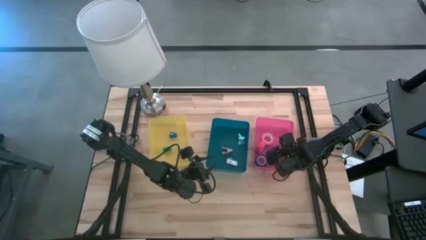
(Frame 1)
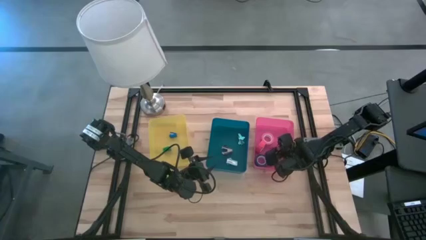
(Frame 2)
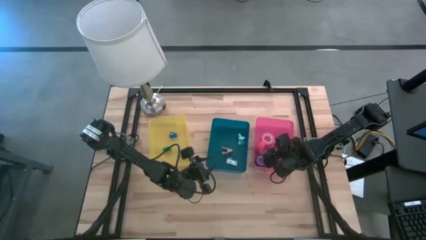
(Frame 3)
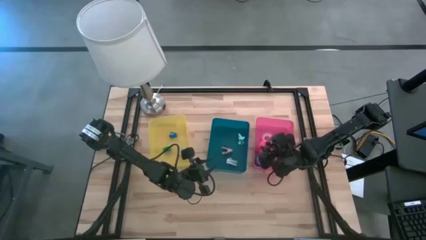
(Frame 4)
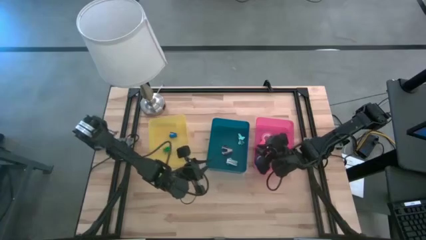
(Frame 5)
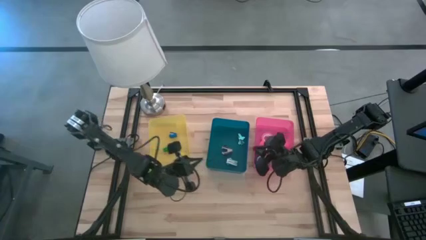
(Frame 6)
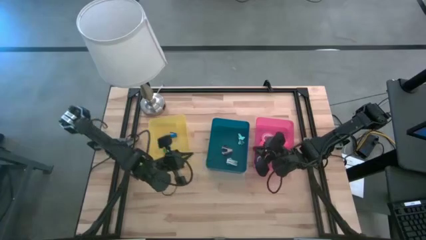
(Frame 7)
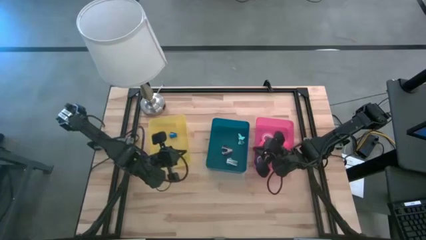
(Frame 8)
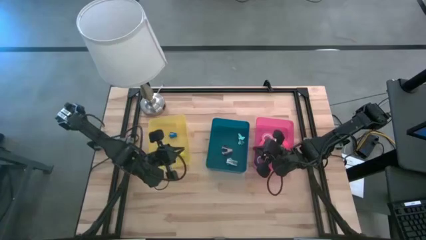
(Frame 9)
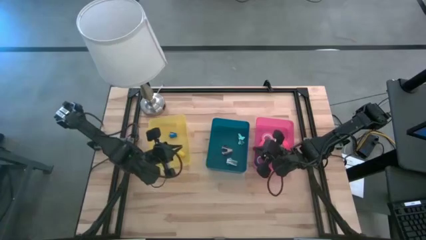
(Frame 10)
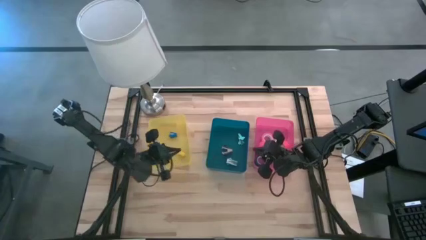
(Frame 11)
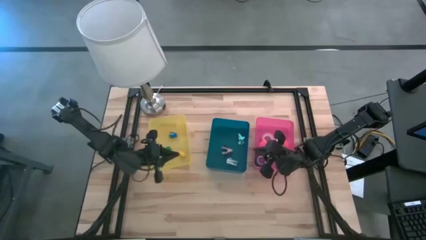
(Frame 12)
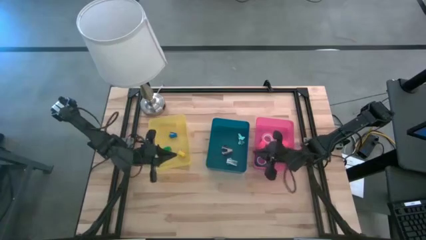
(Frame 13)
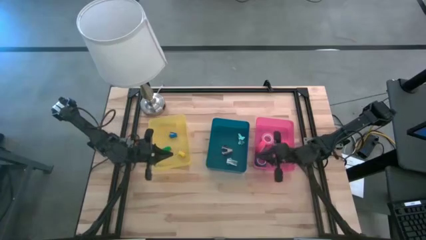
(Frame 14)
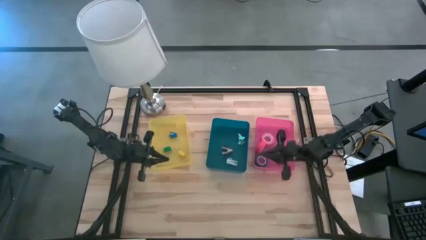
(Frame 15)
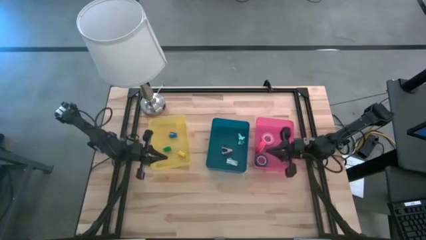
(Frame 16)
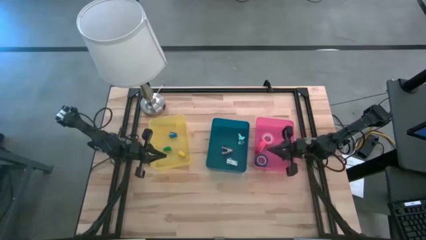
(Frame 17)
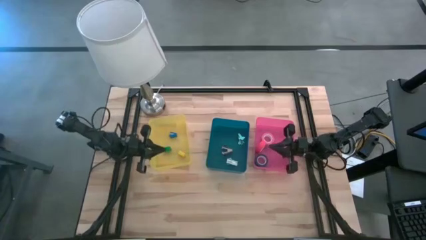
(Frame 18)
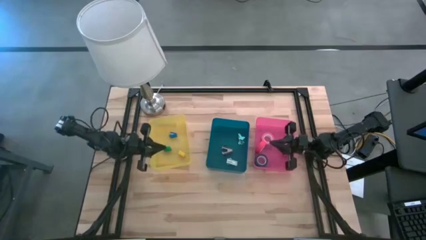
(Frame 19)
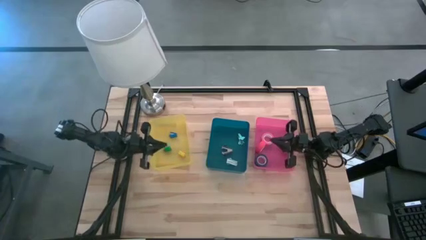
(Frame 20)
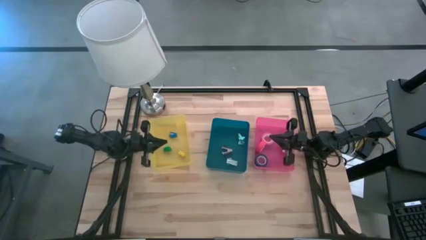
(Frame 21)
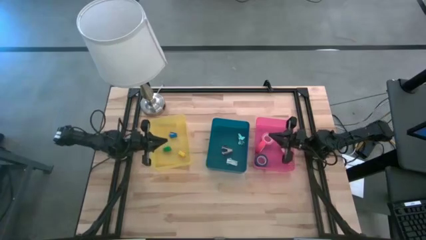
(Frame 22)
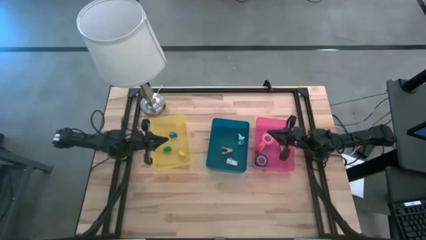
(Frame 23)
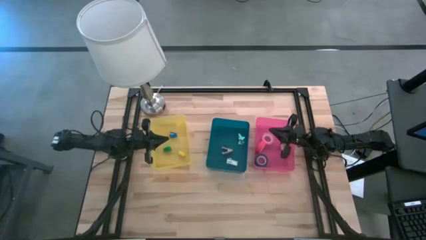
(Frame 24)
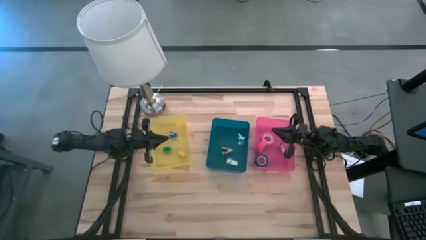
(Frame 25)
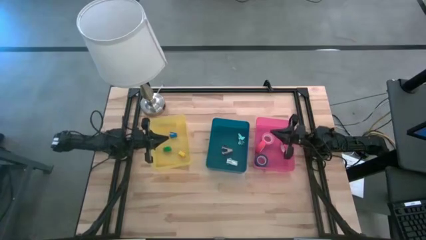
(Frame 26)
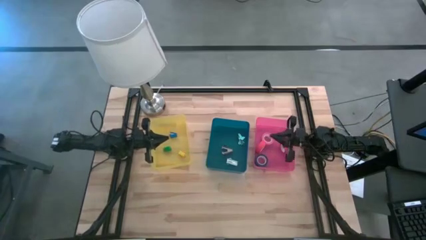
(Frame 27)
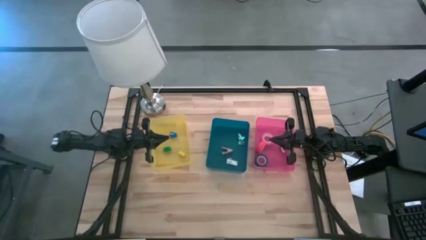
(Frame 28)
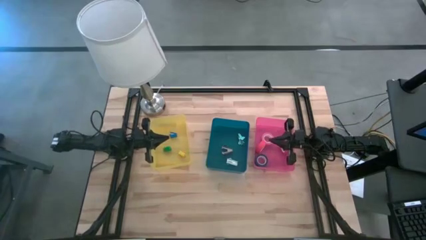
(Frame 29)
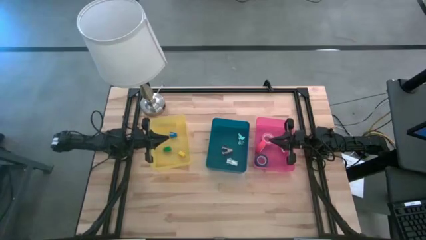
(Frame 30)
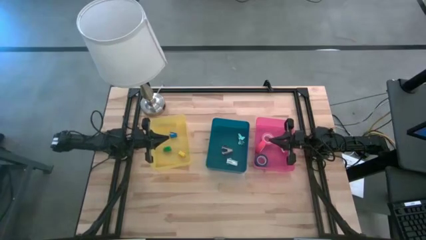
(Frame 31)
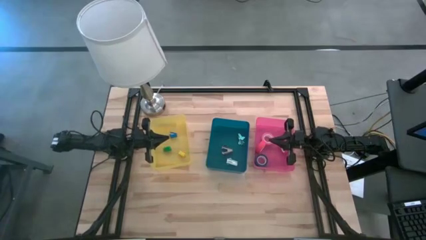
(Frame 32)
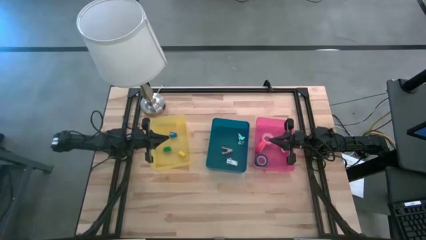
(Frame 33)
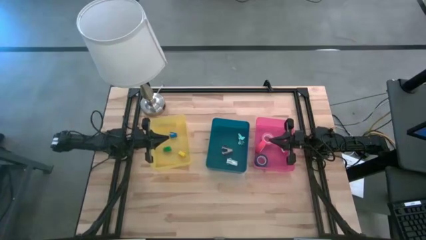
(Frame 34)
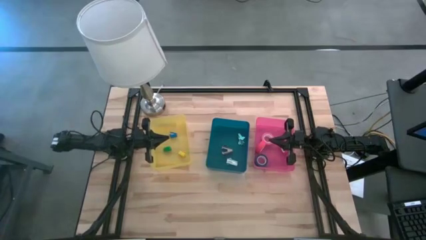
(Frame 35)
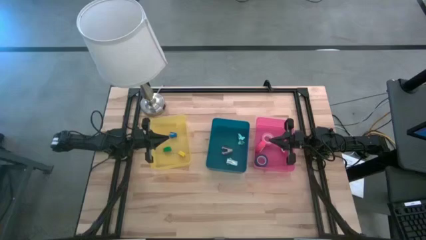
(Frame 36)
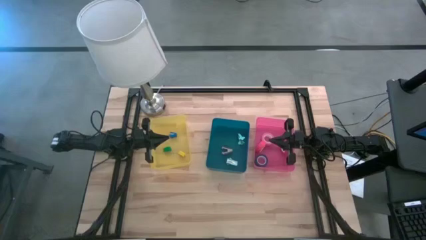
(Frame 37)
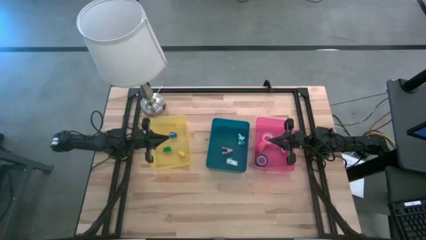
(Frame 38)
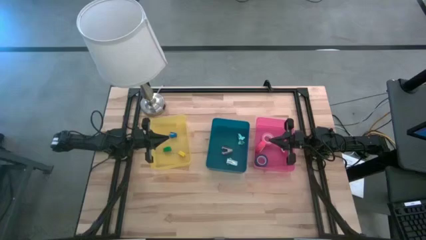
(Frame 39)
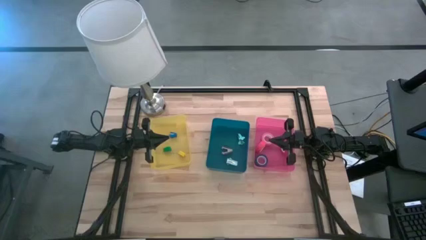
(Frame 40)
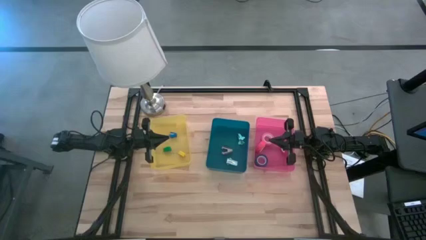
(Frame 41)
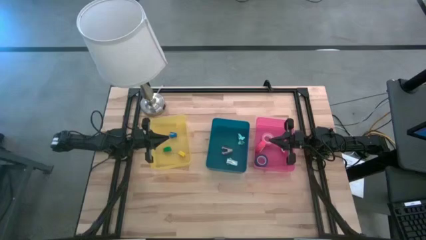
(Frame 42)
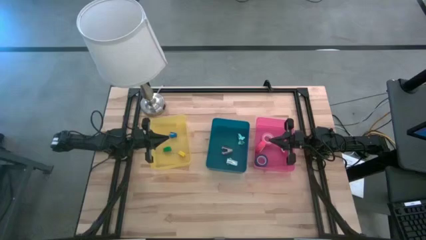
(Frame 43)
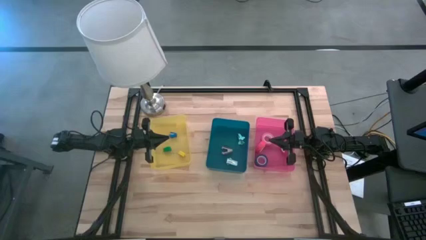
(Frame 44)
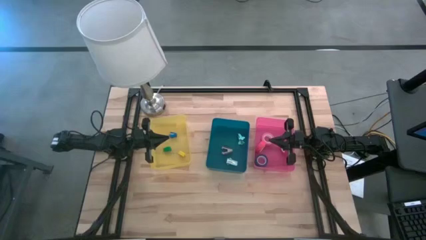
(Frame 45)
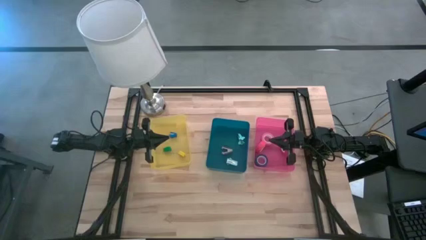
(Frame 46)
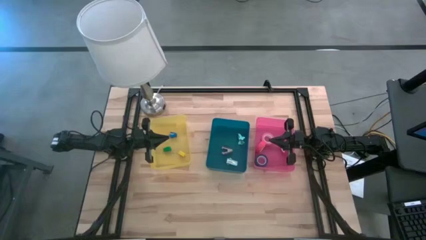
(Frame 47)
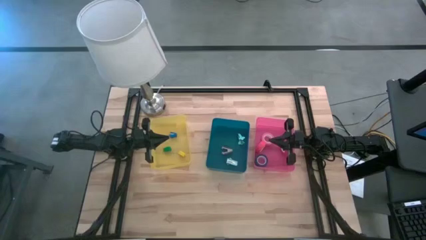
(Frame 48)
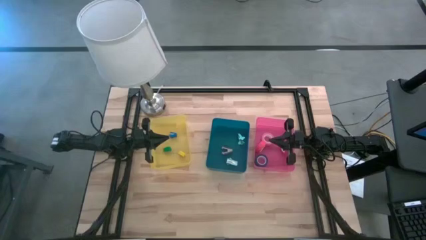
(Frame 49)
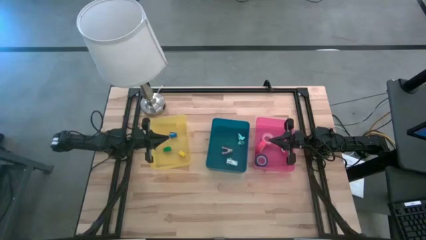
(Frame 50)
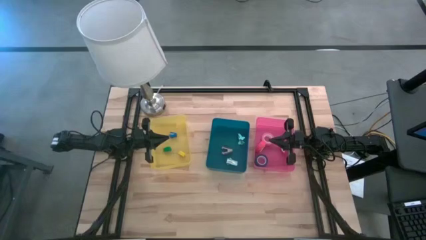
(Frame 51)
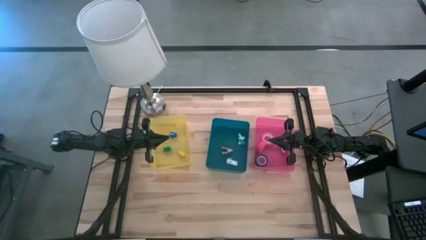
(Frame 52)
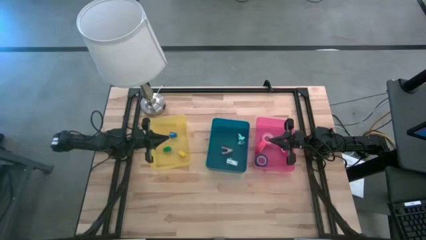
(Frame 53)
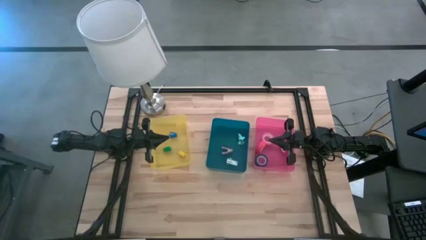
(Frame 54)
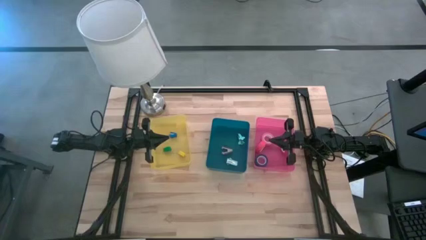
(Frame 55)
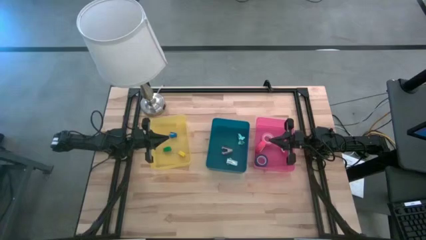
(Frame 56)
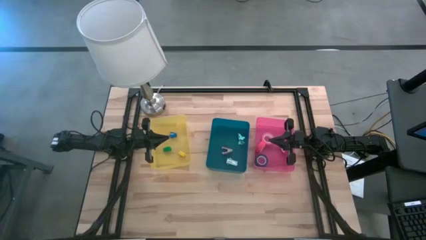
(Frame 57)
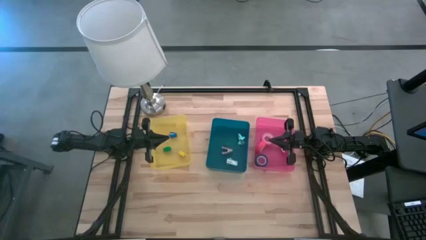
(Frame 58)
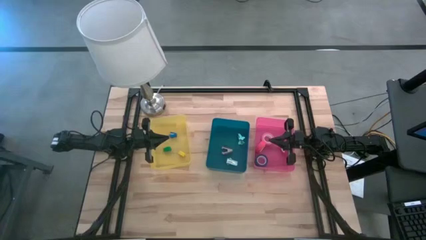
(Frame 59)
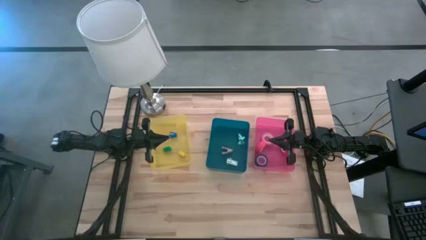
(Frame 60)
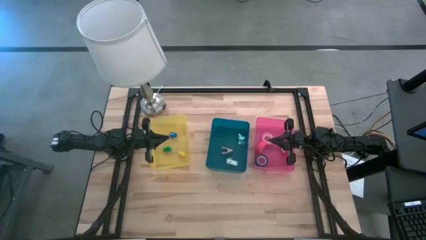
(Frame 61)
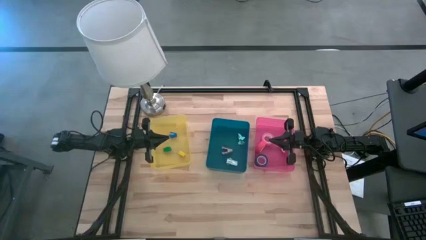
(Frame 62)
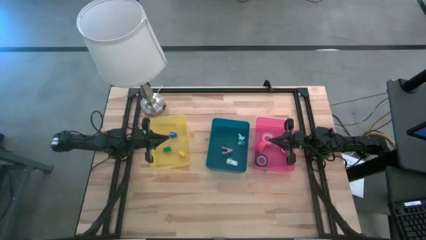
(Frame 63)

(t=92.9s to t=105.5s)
Task: Pick and place Stapler, Stapler remover, tape
Return to Home Position

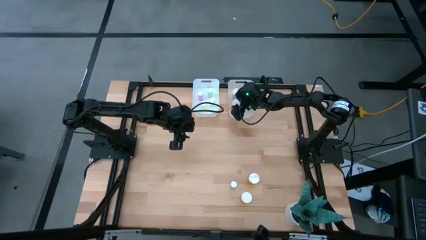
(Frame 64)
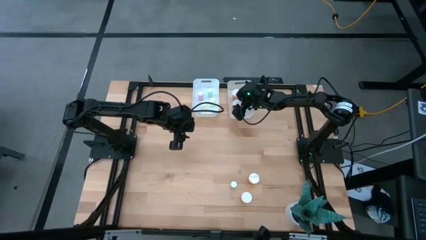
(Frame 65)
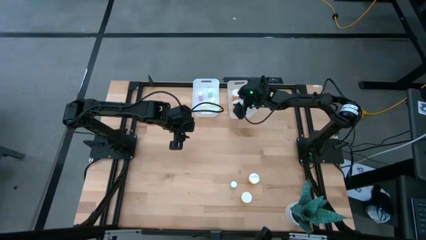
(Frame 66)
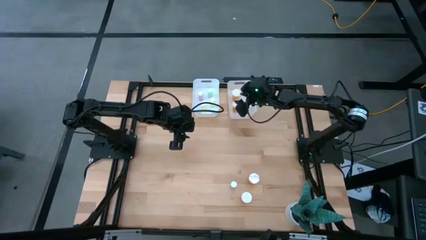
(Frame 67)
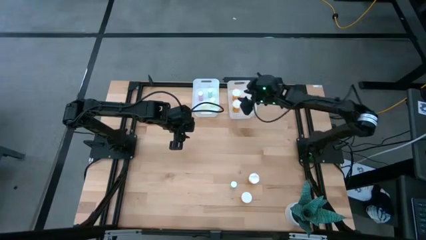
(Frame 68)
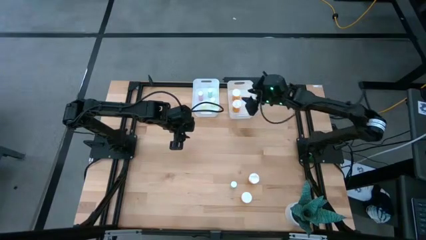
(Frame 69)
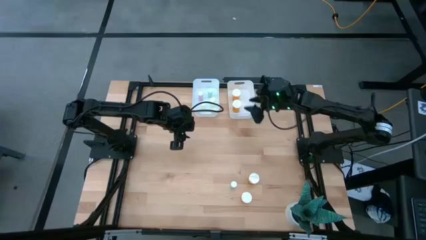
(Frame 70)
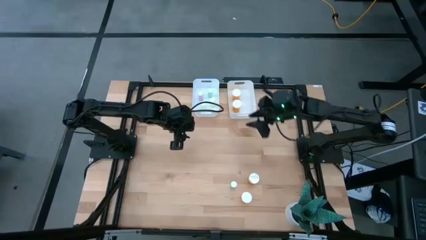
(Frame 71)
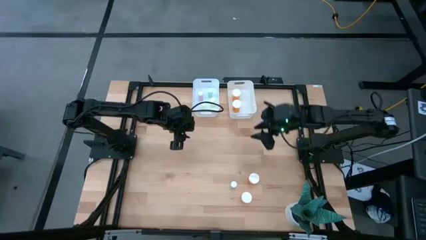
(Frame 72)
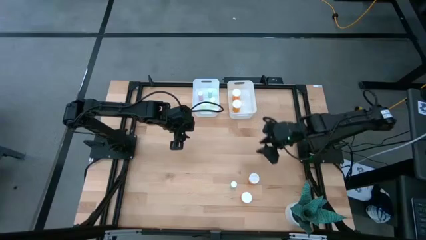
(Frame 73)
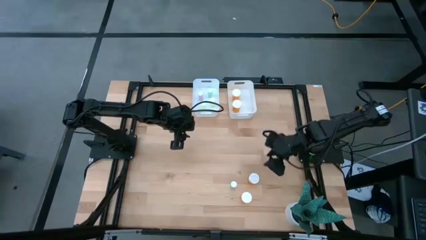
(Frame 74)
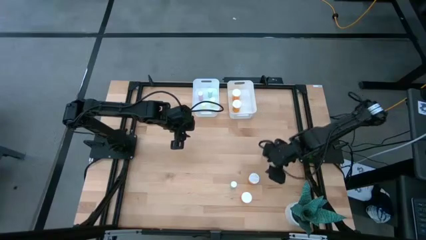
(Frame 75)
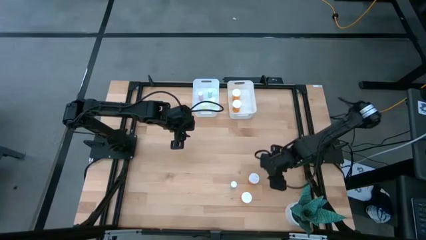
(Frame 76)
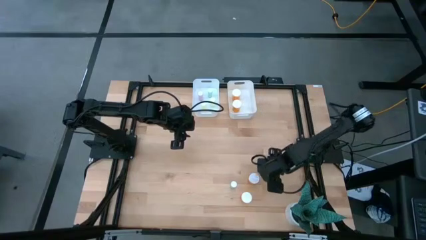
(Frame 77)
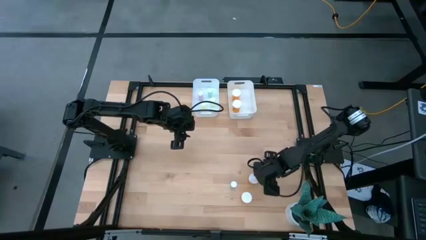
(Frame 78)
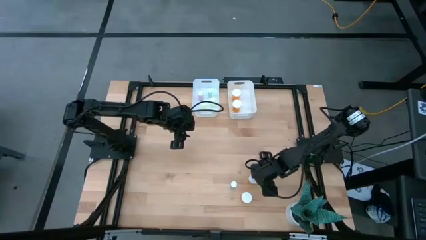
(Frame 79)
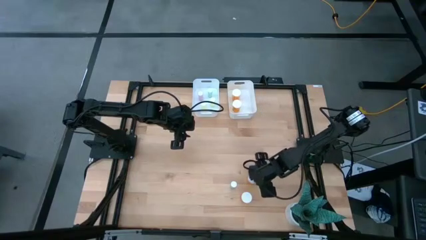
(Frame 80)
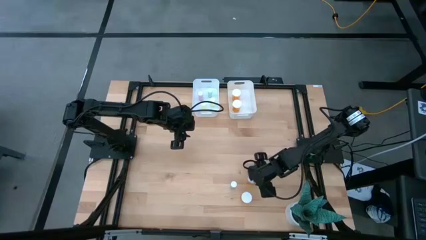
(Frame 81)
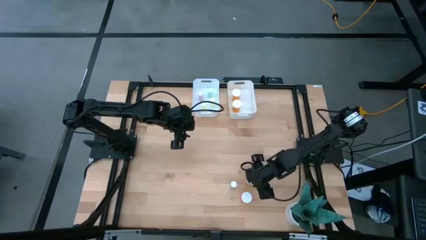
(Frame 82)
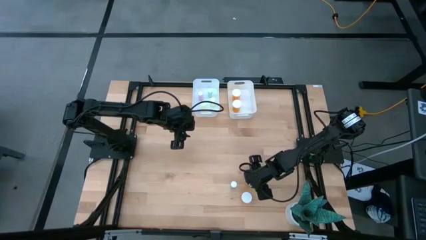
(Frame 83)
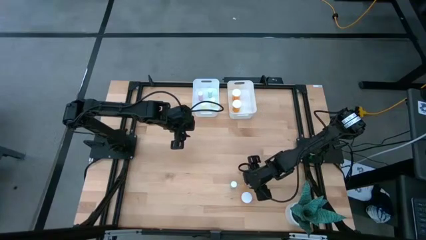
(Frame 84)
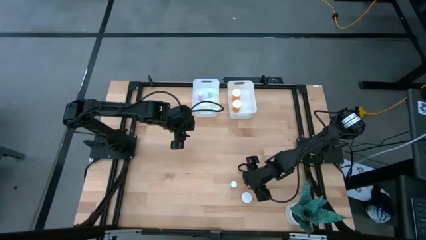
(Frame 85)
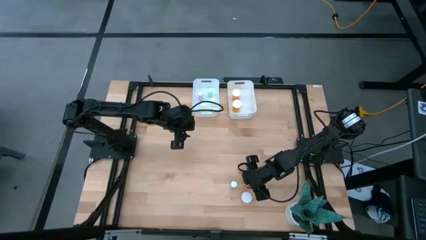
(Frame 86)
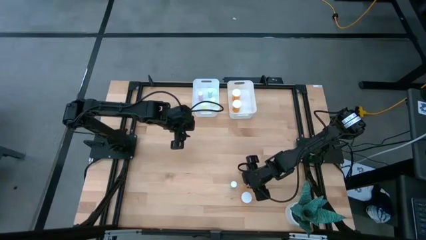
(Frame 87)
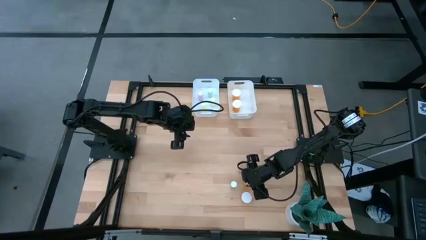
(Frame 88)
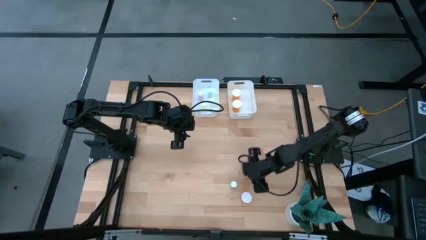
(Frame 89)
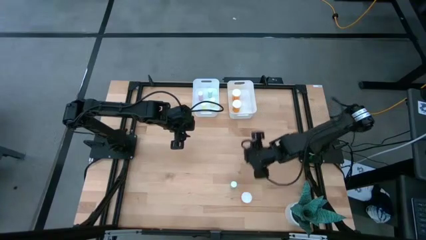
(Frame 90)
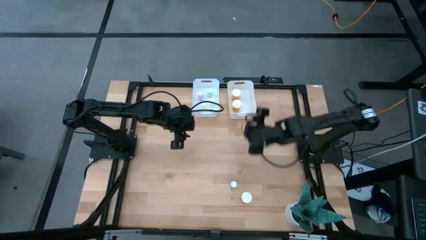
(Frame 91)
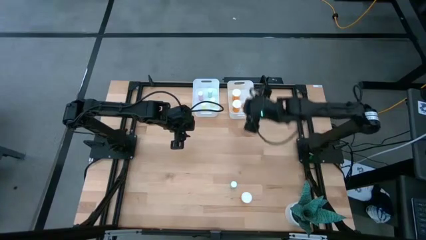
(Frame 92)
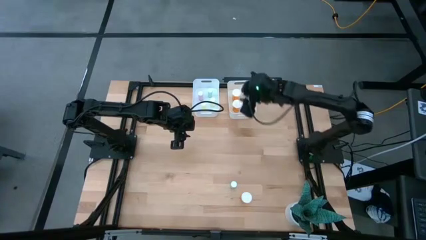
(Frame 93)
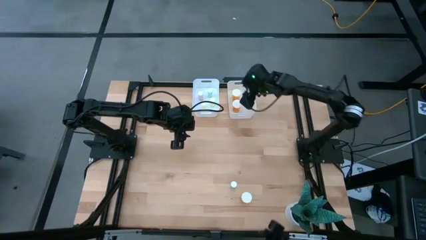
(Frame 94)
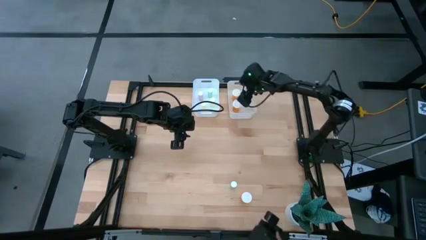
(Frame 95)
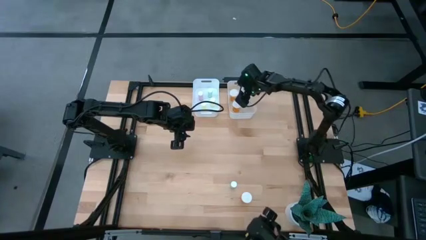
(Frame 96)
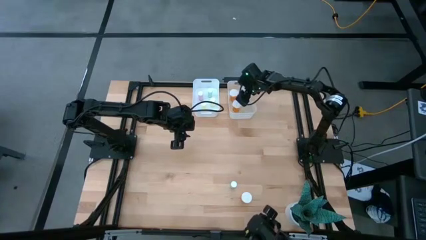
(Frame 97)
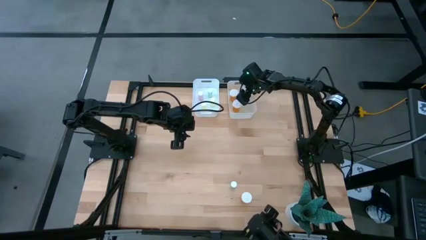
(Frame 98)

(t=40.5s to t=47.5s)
Task: Pick and place medicine bottles into bin by pill shape (circle, oval)
Put the orange capsule bottle into the white right bin
